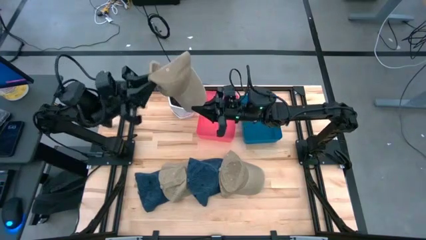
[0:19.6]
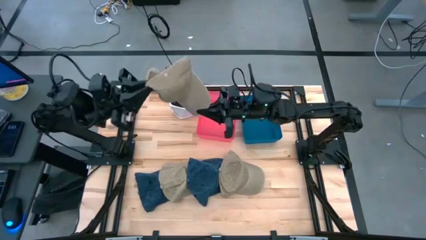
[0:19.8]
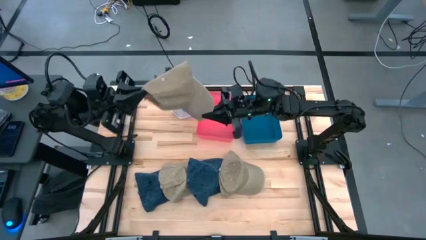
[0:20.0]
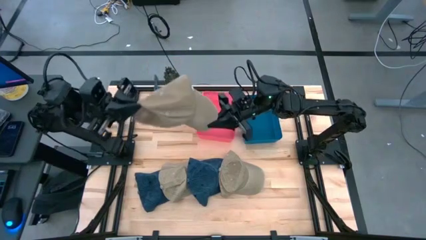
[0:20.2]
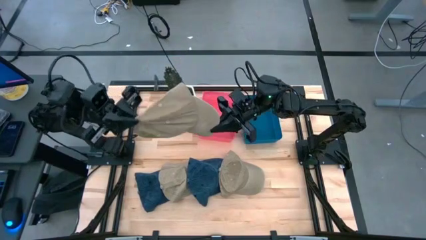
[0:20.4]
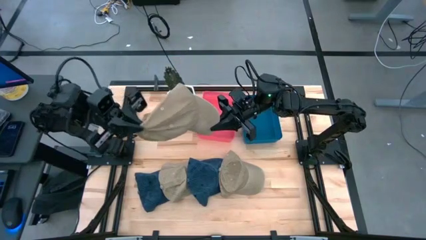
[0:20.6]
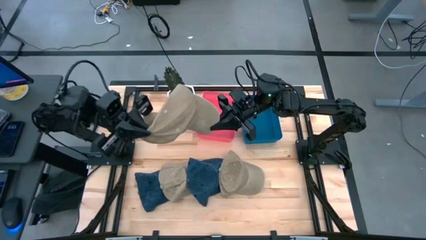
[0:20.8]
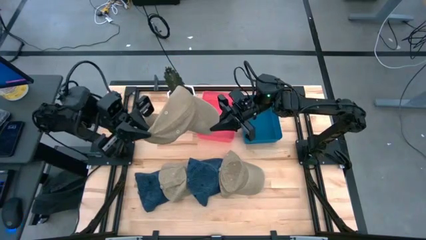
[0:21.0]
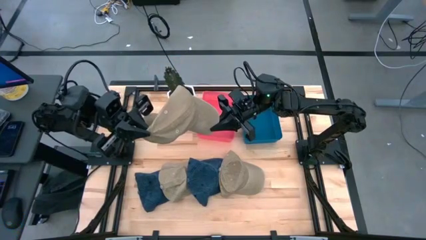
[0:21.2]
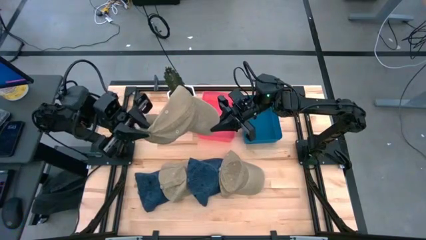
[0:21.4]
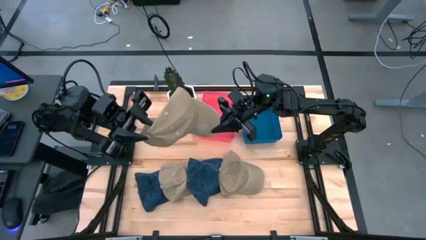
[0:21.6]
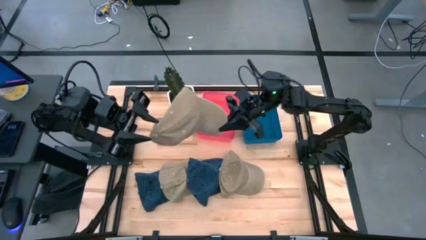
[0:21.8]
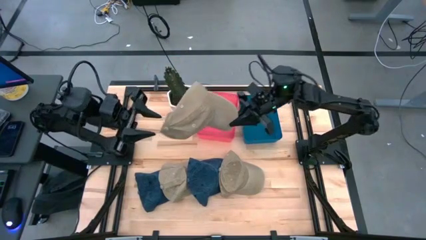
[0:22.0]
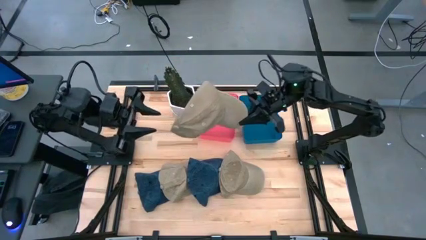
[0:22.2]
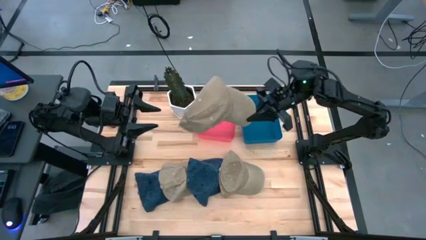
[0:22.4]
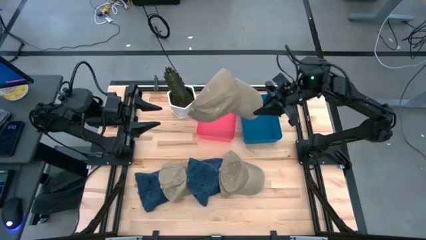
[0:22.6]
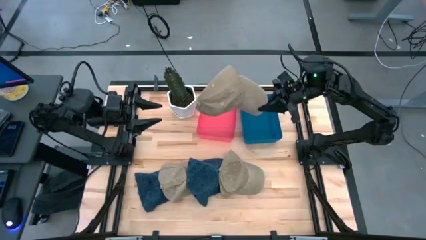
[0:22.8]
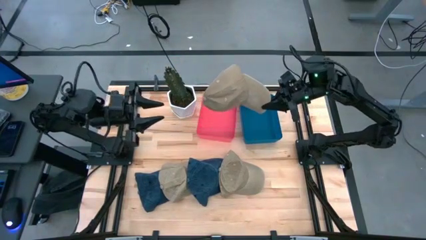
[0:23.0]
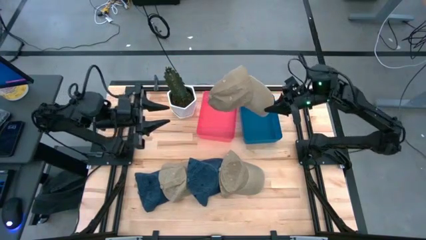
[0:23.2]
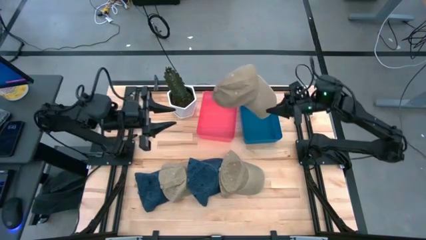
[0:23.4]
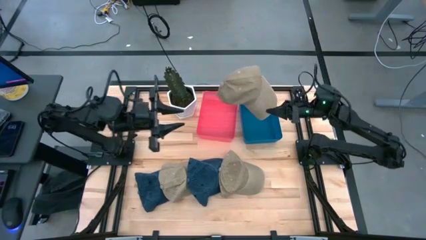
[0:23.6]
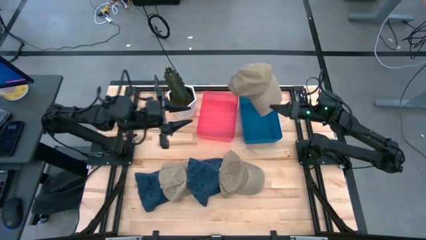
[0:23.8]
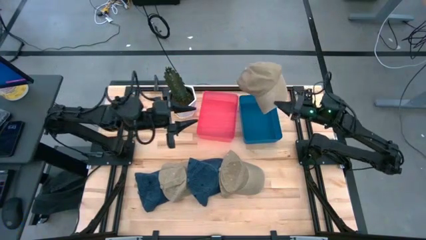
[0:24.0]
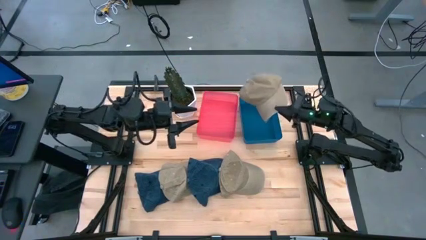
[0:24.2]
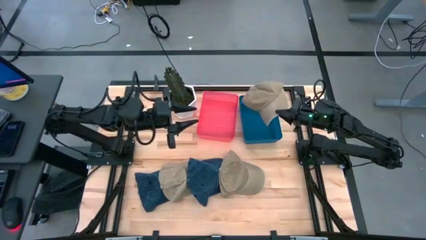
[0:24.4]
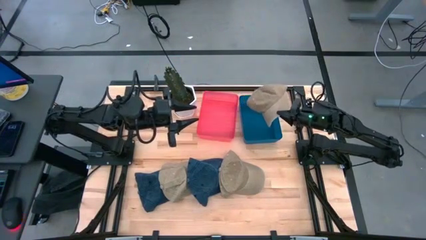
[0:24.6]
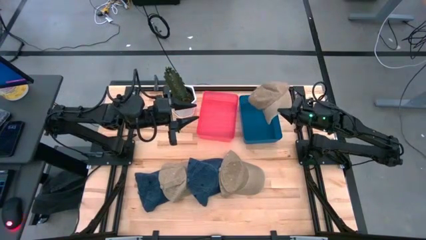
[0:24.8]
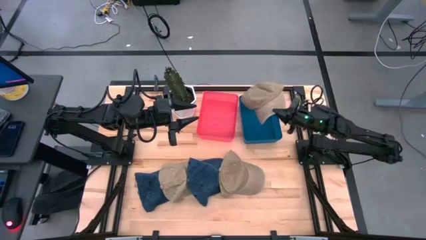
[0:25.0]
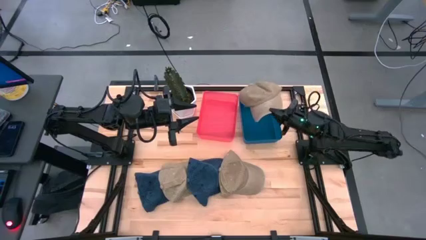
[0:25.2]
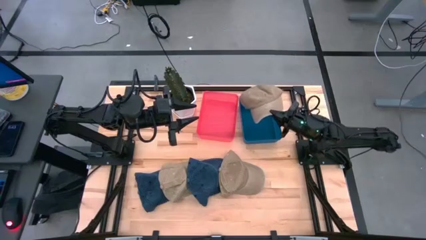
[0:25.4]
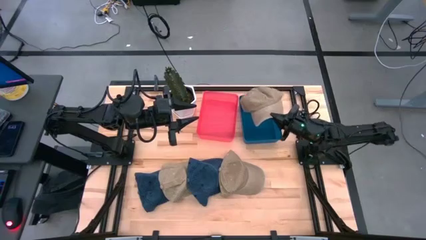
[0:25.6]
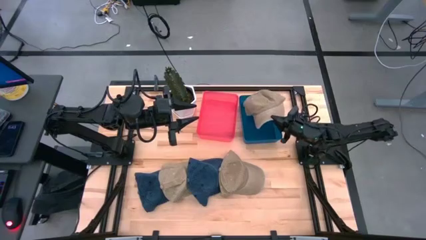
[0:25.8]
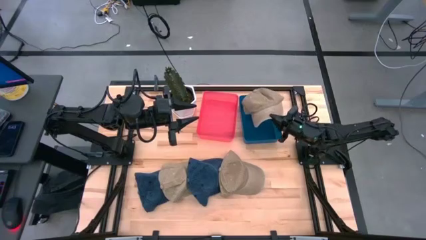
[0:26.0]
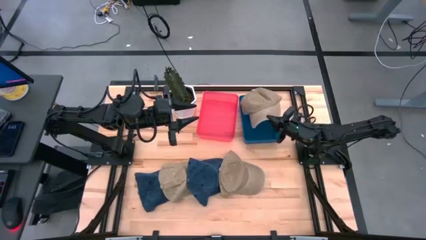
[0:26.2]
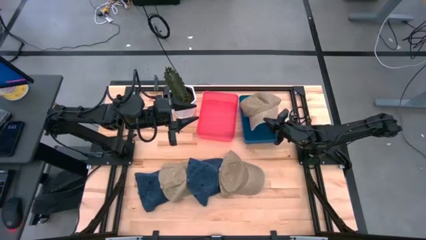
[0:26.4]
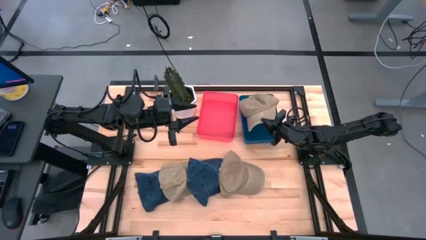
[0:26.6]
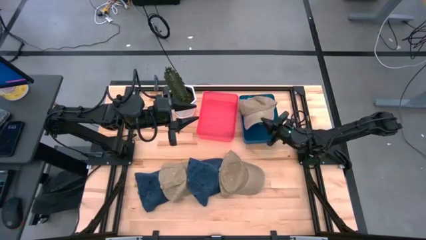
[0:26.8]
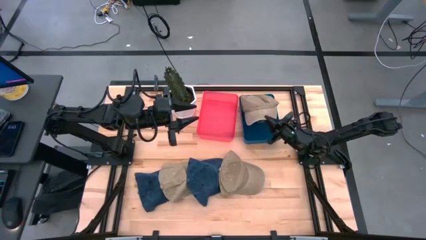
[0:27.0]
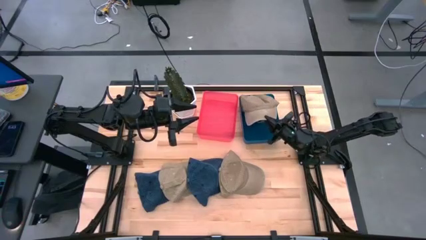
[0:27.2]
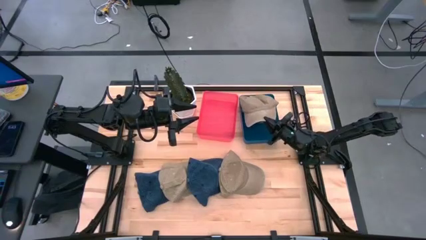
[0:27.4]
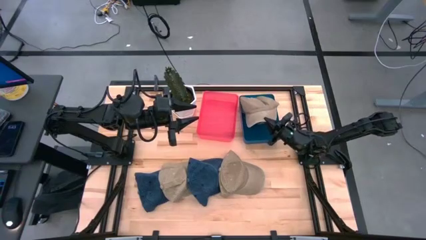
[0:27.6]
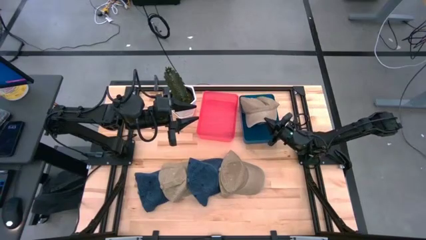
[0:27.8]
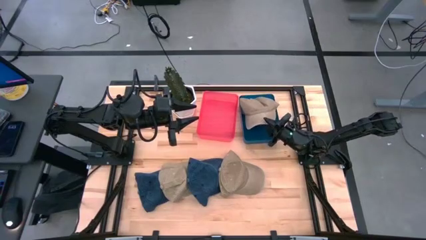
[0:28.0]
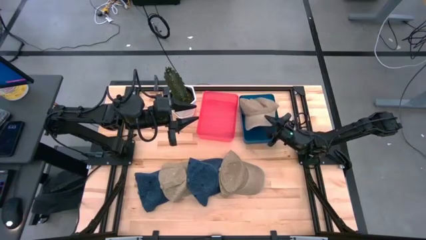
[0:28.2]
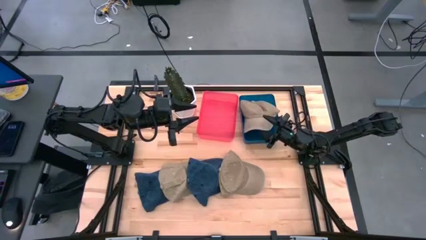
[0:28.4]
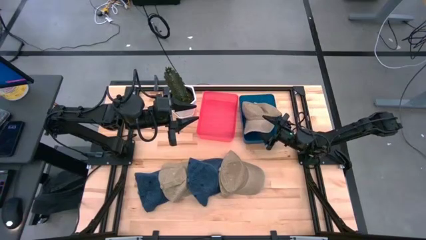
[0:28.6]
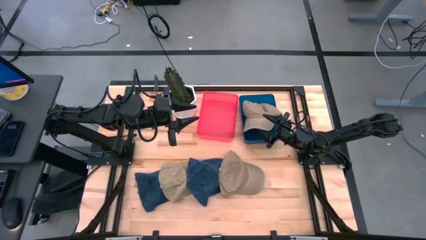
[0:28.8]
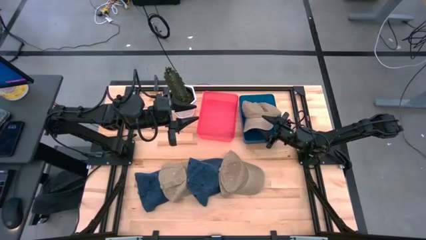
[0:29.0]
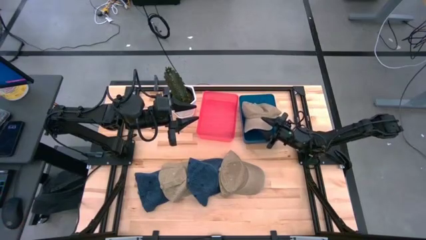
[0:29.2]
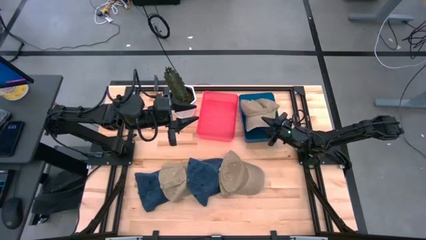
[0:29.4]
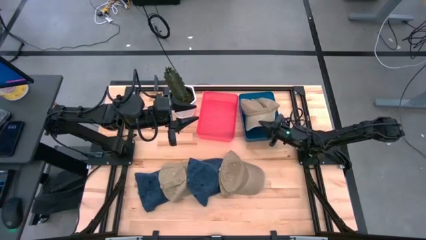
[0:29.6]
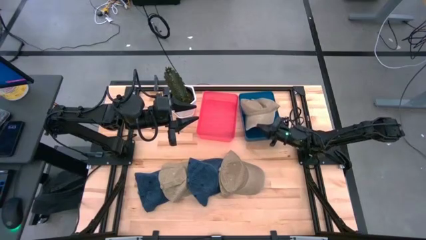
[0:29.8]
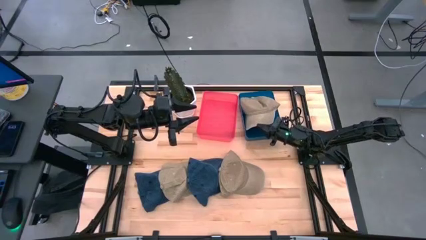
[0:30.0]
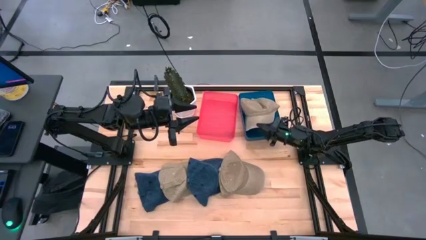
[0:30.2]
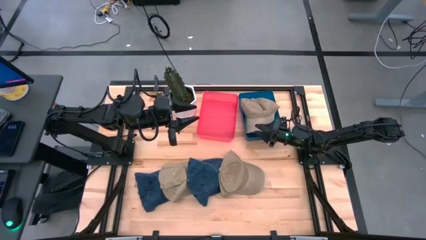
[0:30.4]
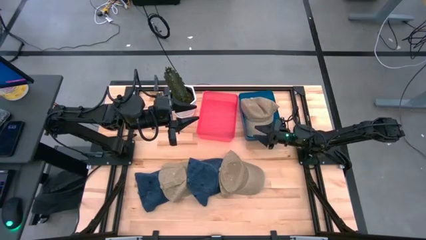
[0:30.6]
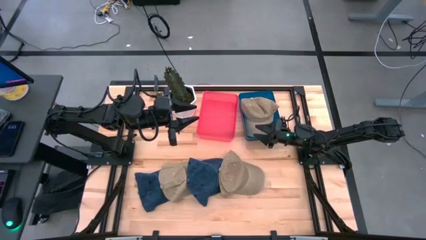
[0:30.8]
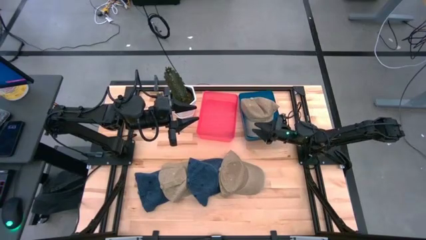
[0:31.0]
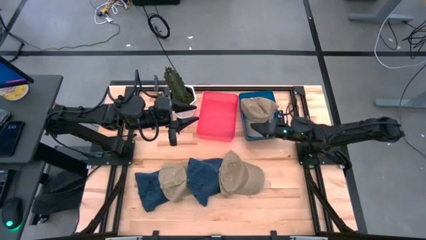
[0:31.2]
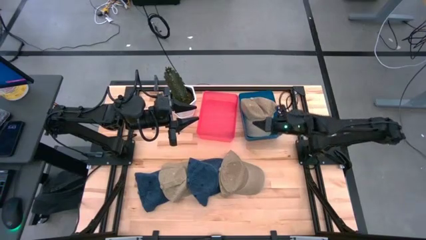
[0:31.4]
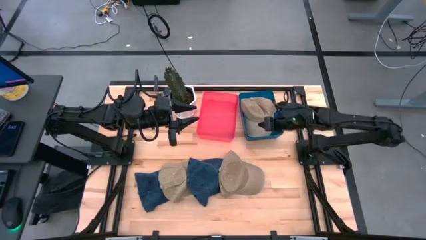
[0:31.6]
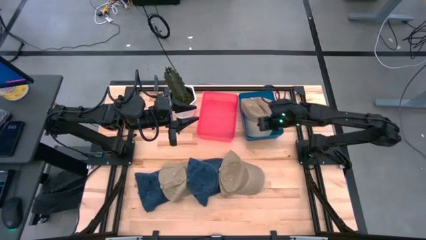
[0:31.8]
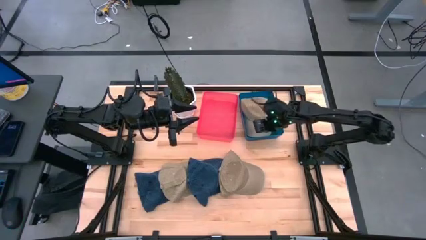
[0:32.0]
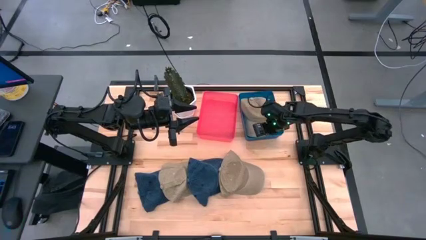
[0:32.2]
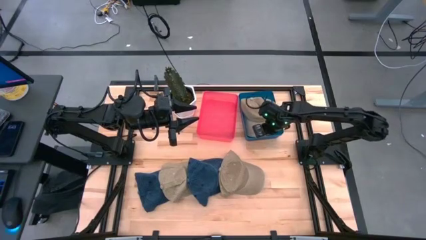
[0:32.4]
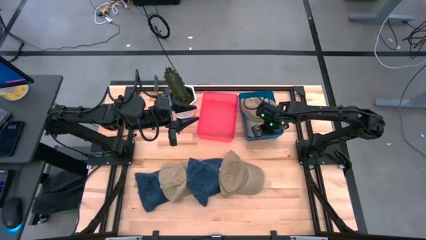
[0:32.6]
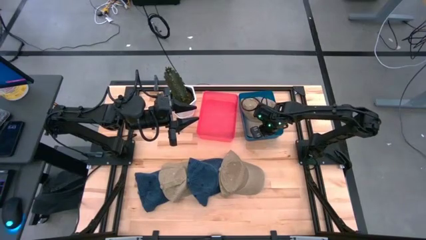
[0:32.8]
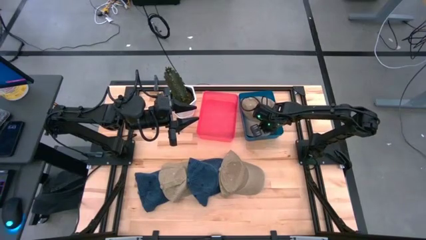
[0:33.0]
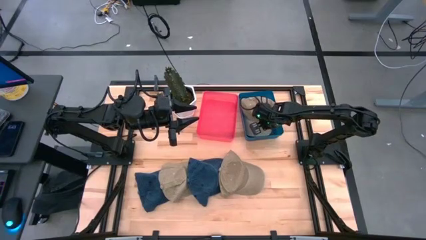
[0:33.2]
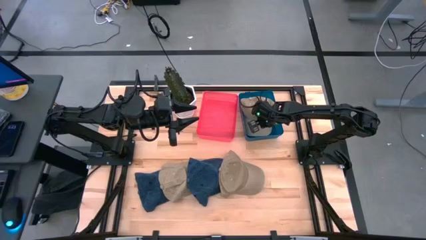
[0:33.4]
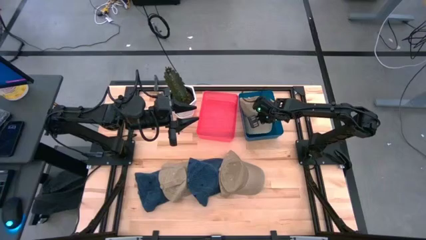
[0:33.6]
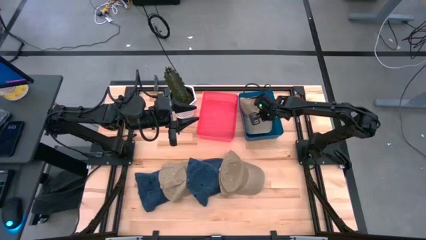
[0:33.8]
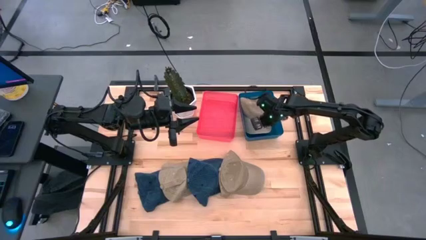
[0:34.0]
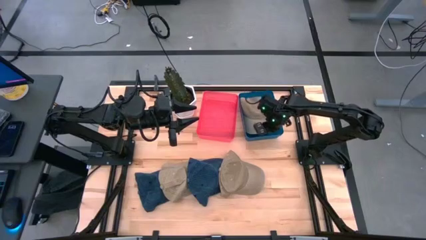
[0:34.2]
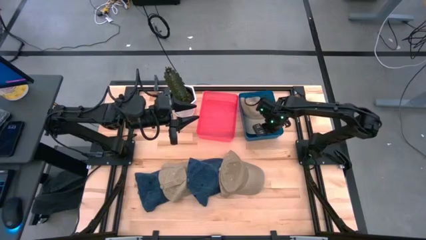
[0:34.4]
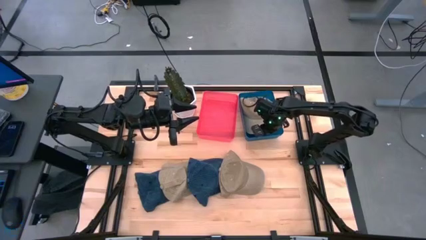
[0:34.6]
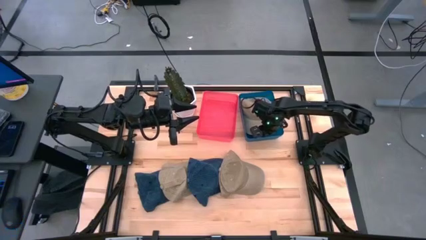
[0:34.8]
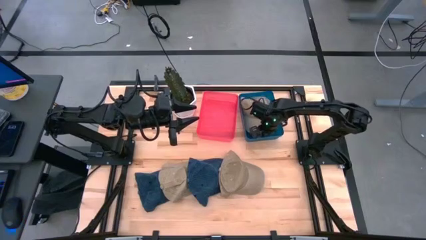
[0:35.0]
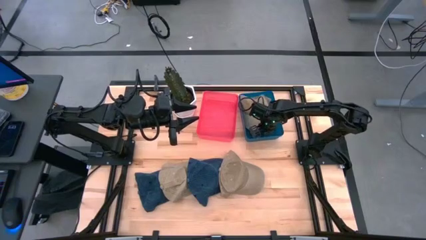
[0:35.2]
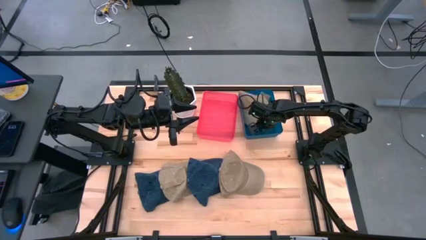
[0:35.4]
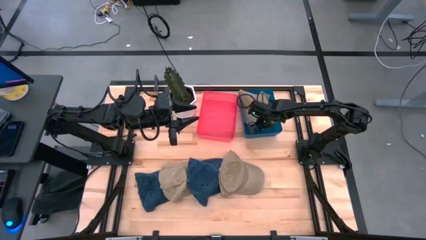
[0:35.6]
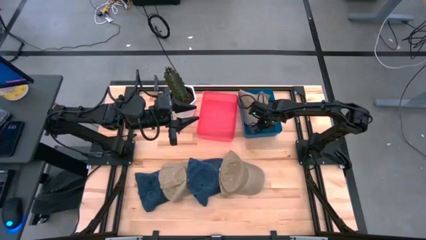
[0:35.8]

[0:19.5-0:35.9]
Task: Pick & Place hat
Put the middle brown cap into the blue bin
